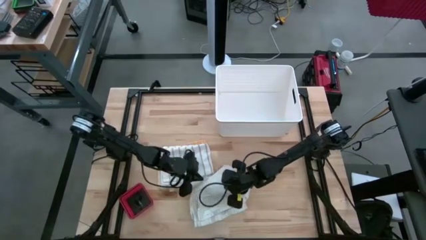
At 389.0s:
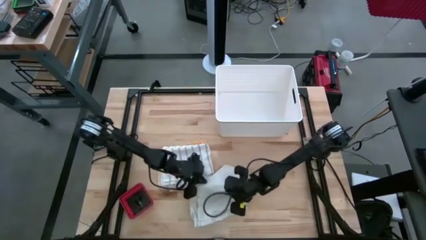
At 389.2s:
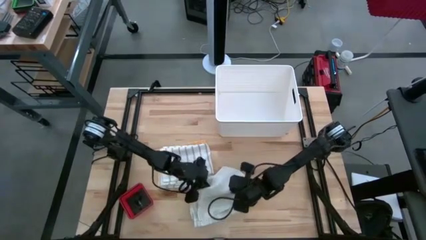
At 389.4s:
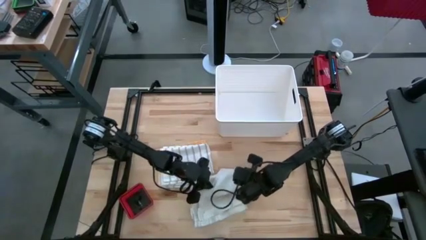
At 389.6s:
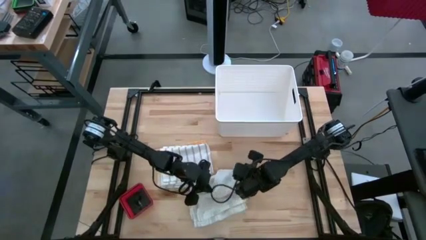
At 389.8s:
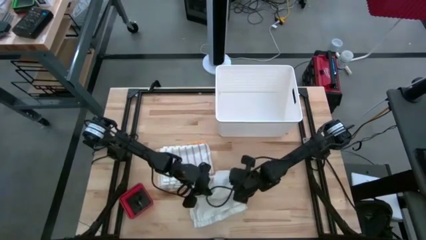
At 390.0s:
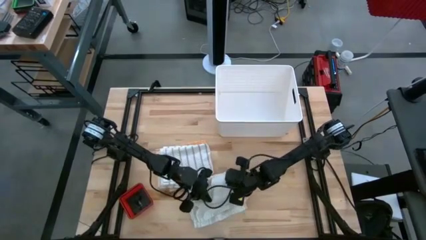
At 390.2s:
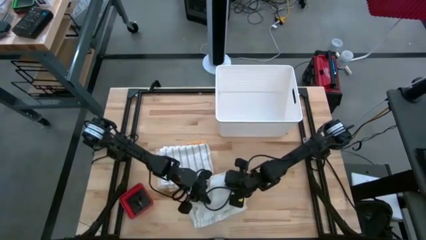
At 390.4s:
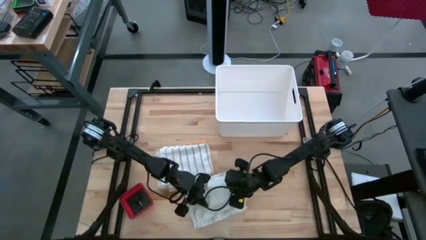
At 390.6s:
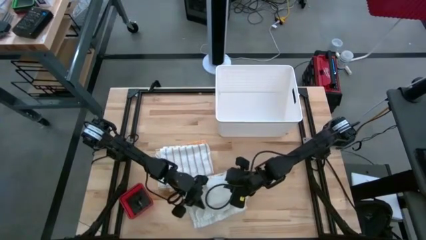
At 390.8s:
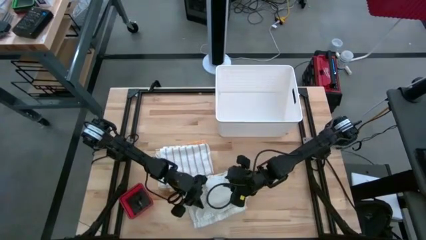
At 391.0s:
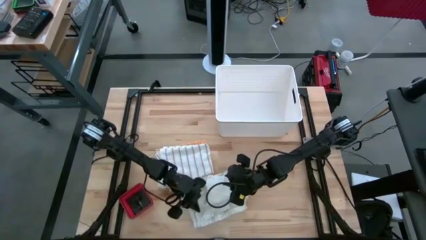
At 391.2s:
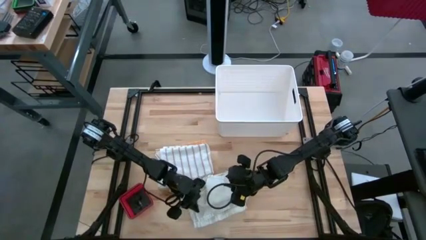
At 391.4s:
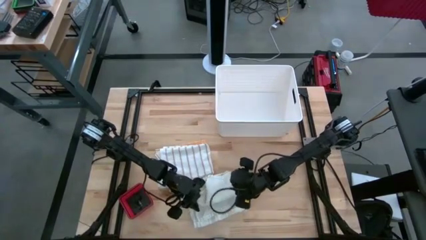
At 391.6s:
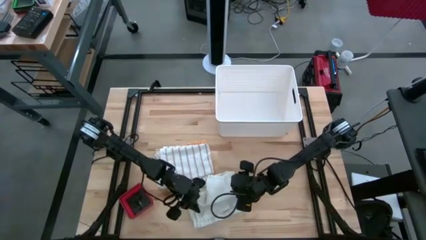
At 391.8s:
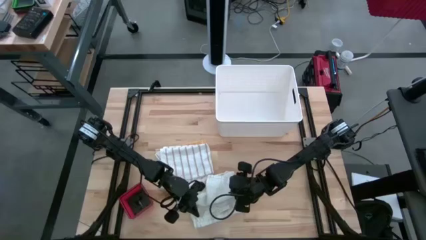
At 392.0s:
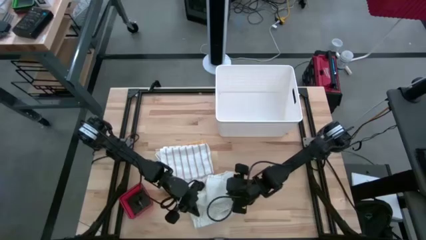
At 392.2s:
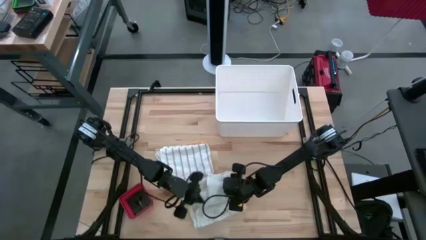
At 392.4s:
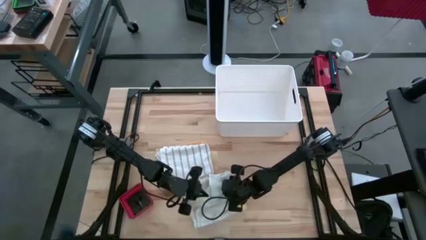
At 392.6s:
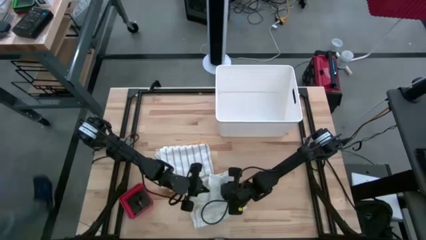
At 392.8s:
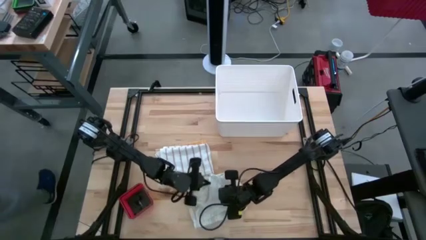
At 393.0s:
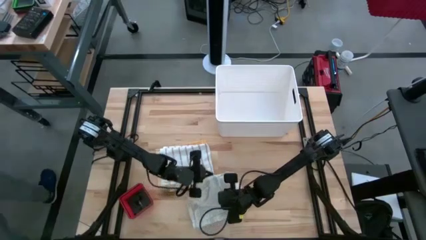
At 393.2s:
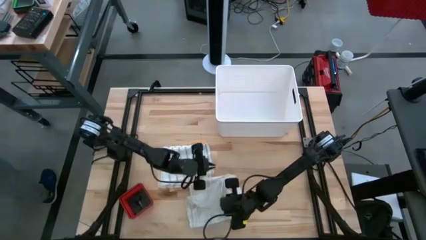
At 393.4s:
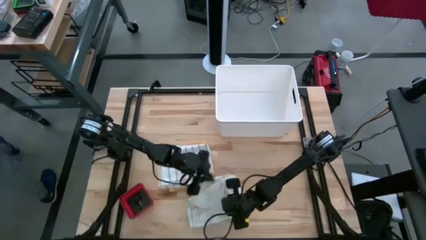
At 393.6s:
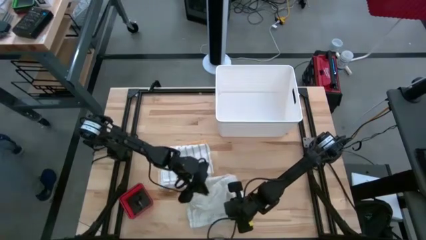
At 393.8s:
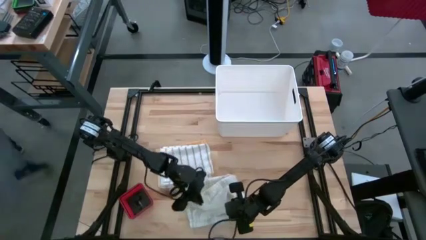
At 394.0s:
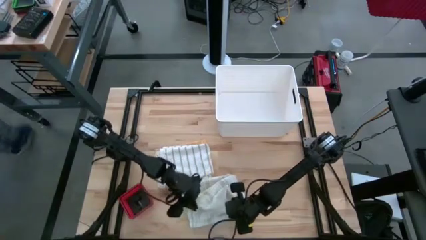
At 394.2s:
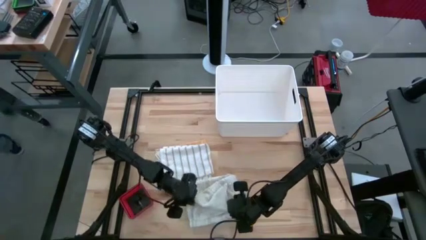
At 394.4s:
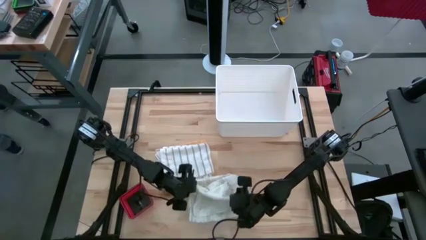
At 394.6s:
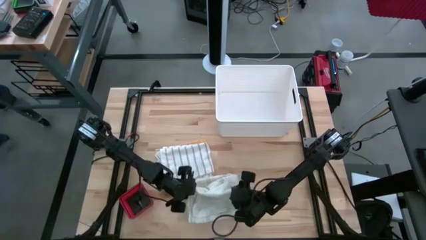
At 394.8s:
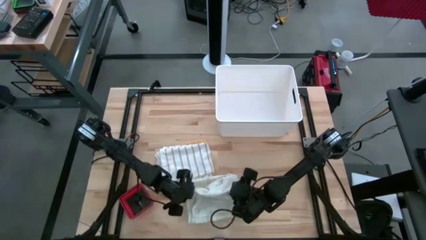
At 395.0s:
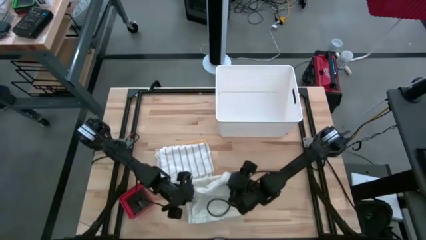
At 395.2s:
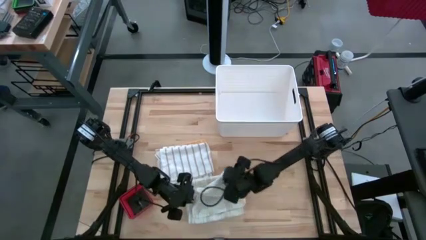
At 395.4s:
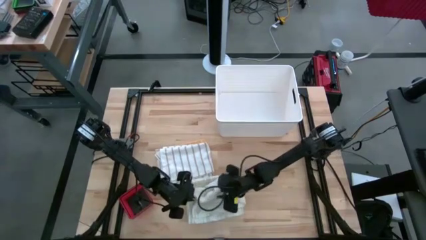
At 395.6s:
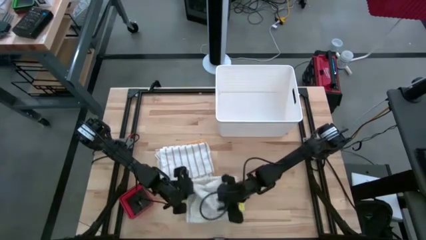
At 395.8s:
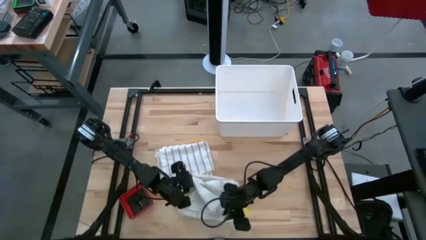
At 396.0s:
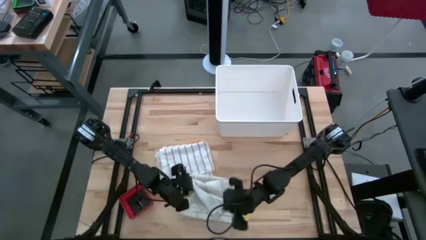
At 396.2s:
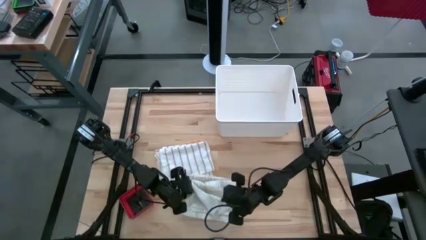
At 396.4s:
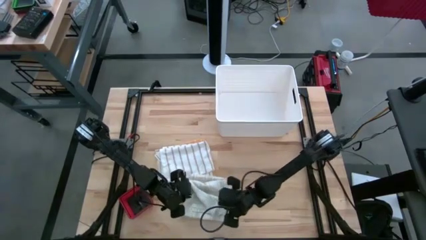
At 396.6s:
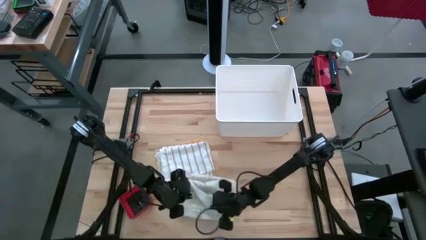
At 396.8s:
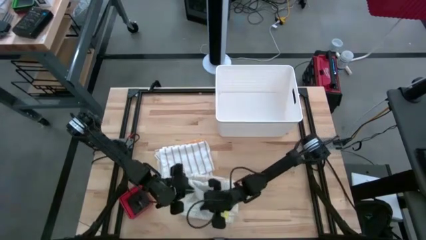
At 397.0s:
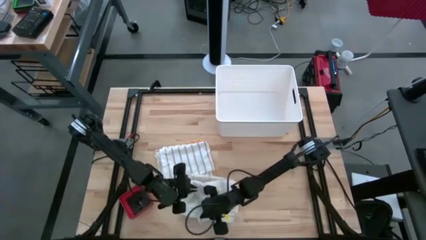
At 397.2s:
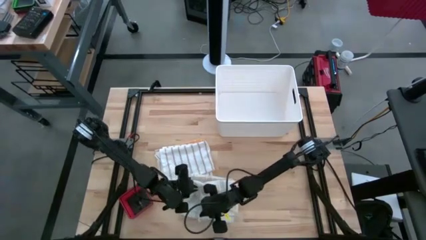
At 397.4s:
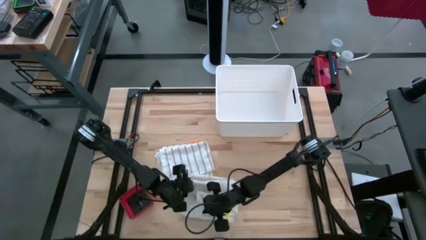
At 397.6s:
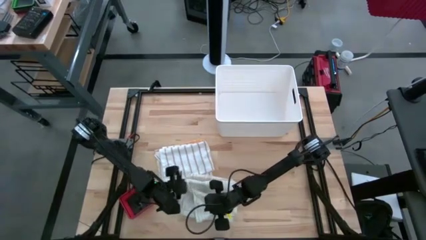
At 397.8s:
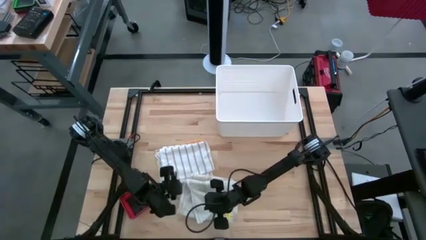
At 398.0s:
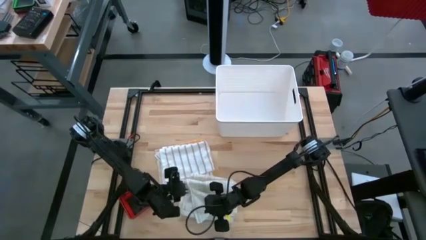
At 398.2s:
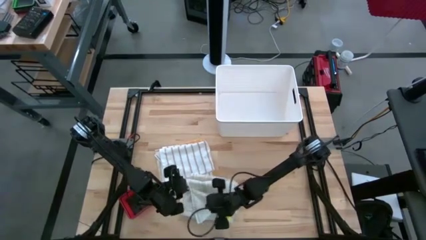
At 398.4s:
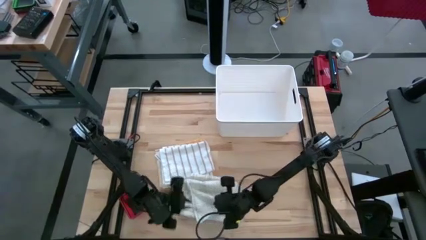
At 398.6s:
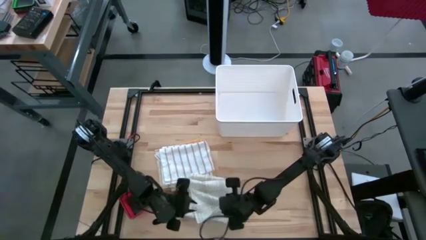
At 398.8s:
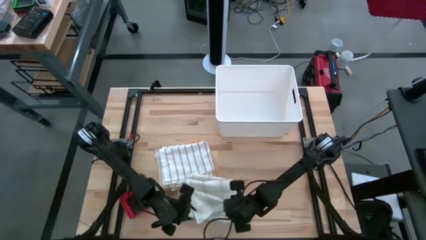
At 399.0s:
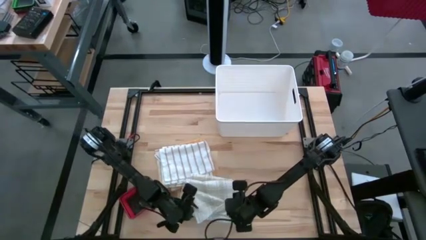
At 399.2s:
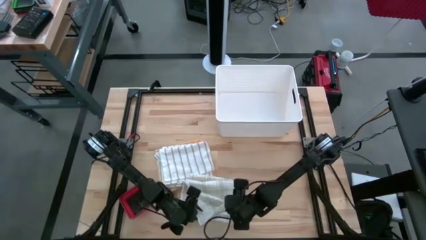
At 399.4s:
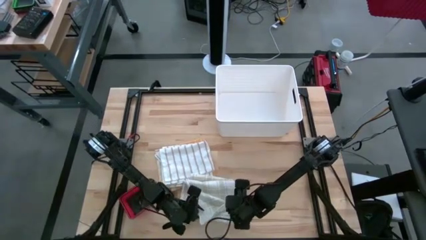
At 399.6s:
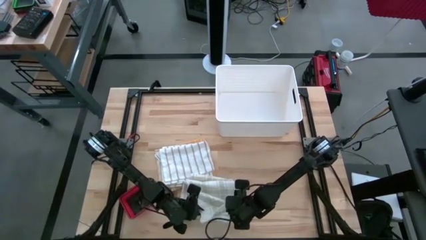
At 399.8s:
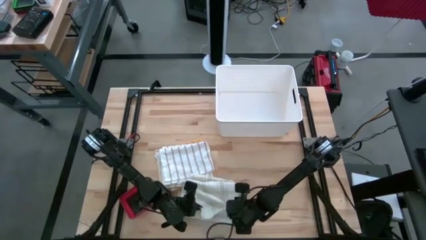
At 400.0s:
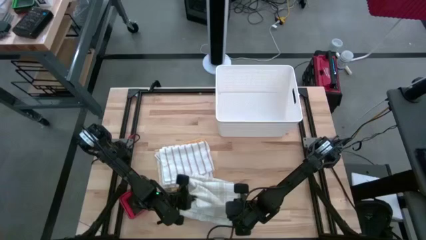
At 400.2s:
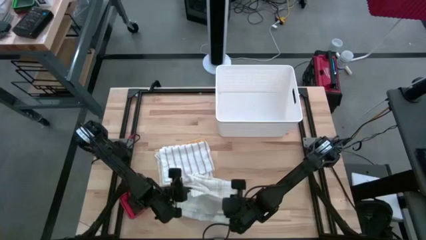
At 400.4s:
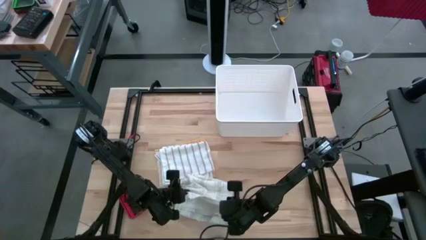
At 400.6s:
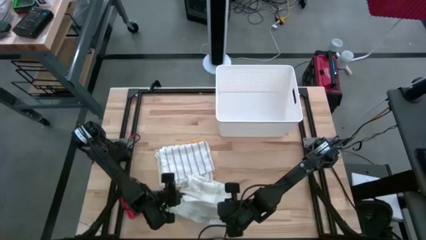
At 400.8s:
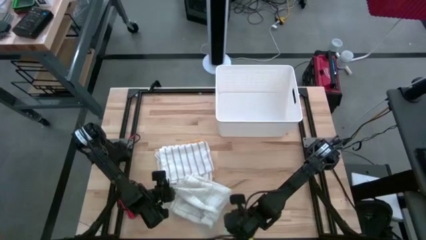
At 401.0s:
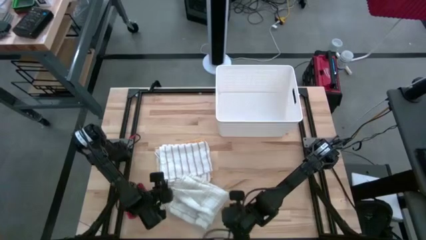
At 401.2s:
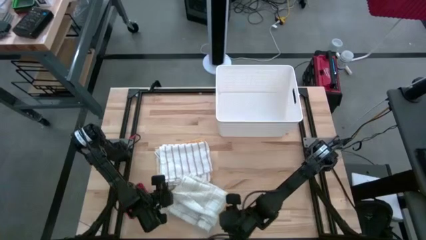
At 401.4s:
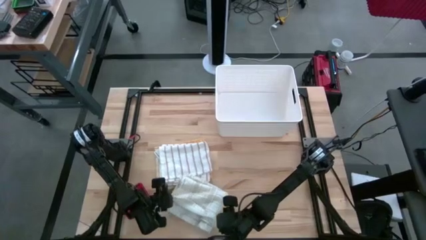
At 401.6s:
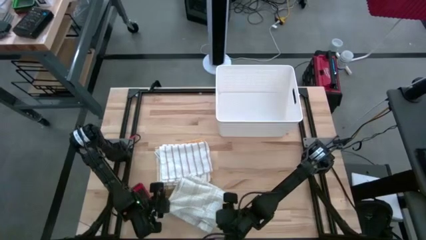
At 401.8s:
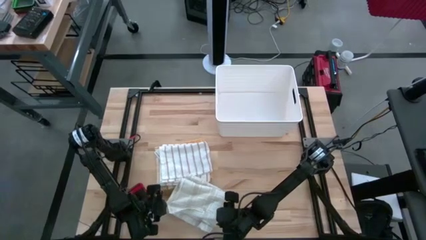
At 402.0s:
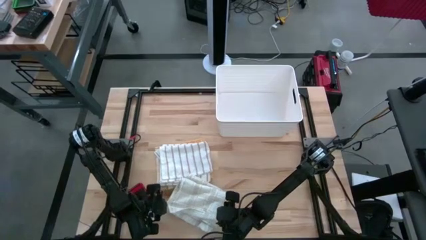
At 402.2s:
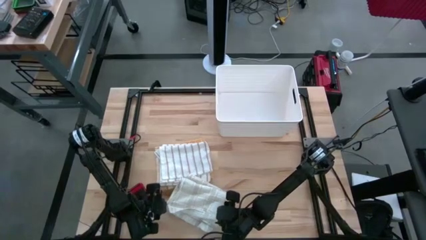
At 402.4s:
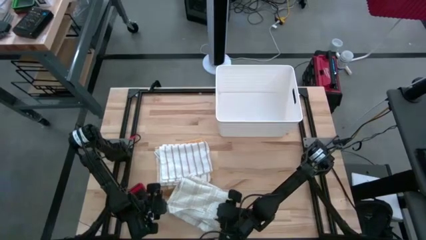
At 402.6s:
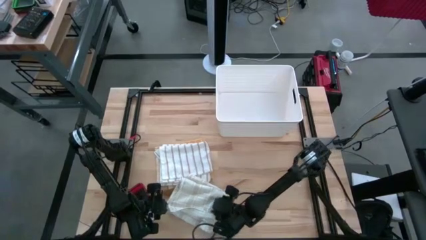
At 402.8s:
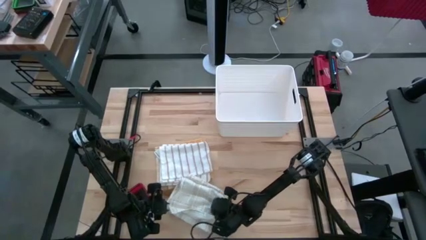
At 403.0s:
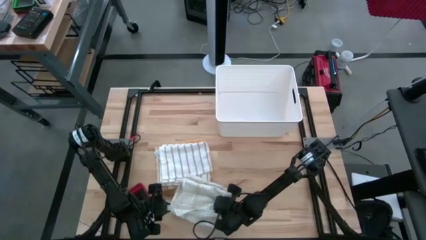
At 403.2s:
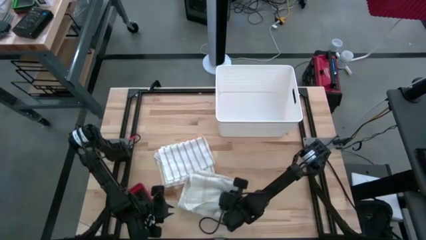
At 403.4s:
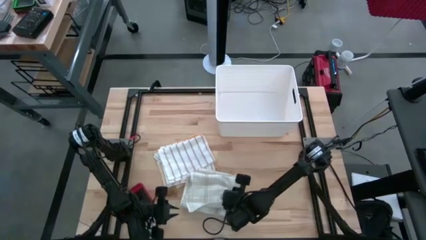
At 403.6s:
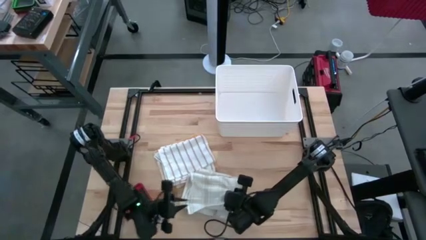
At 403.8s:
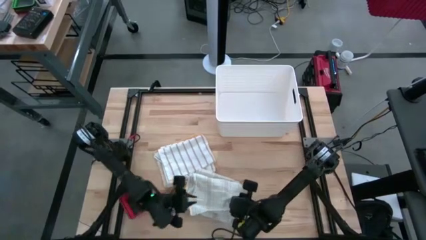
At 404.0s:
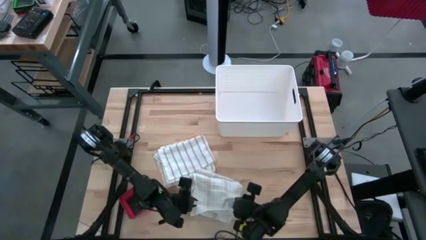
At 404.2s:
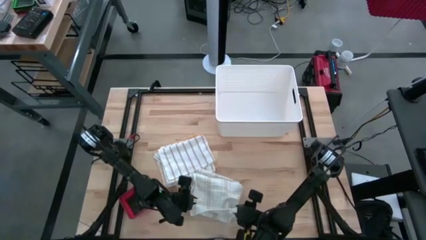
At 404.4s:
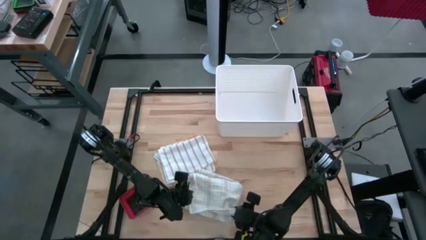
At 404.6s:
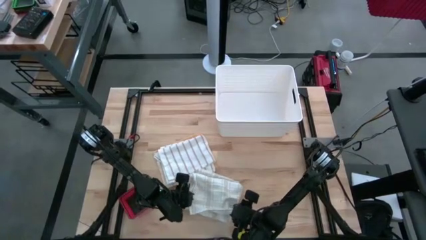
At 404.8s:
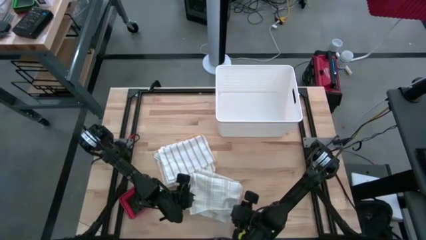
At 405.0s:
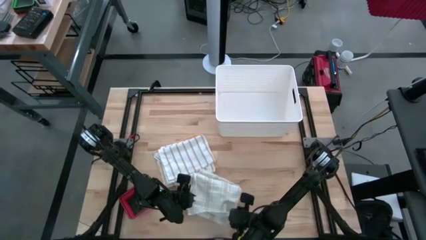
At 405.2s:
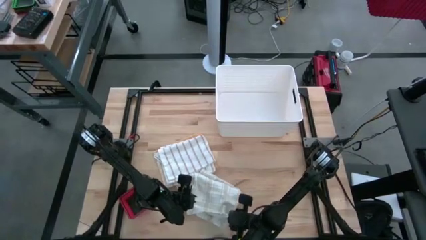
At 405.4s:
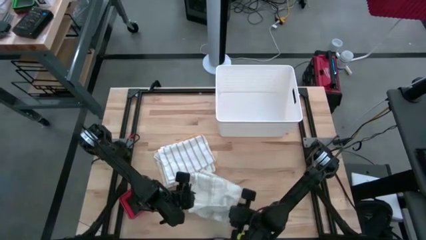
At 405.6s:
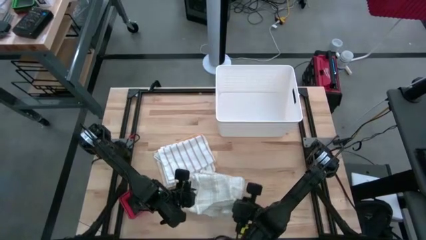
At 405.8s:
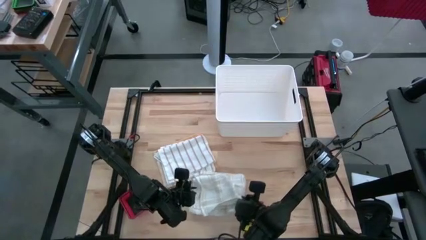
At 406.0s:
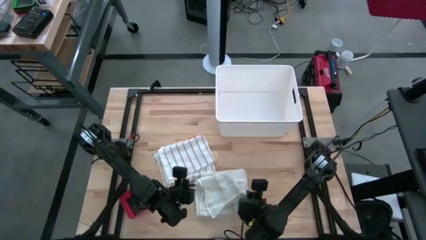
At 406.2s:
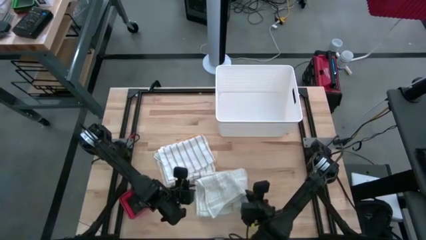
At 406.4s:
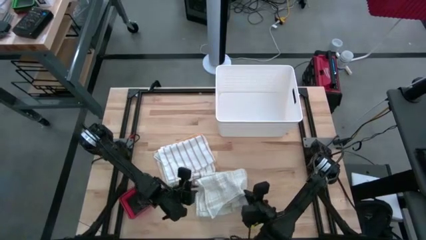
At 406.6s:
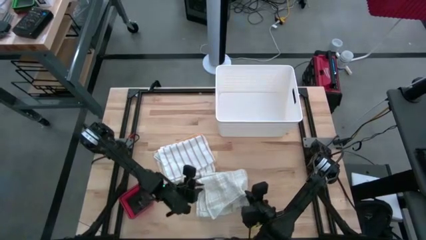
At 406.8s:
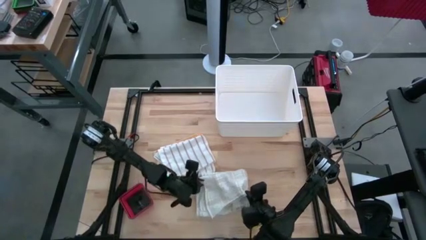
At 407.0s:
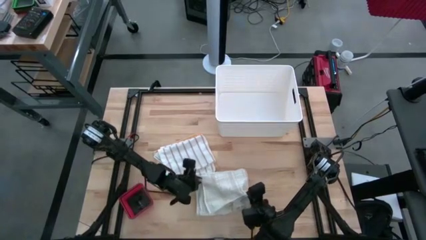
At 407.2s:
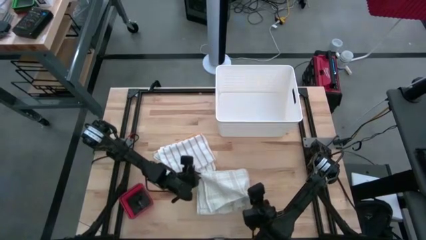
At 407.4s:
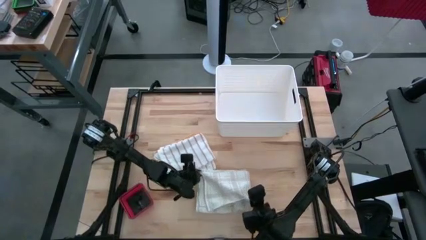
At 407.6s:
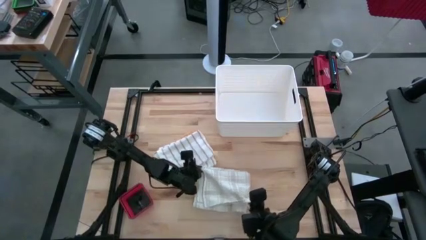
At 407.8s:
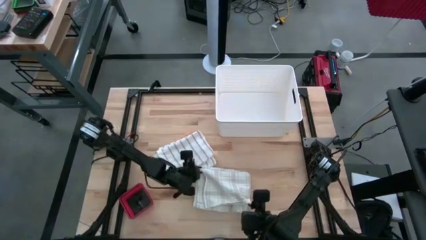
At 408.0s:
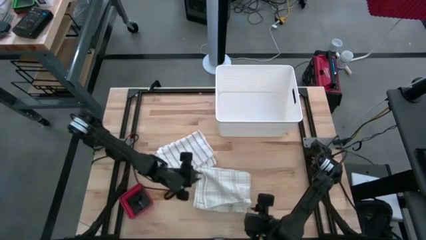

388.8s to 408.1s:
Task: Fold towel
Fold the light gray patterned towel
